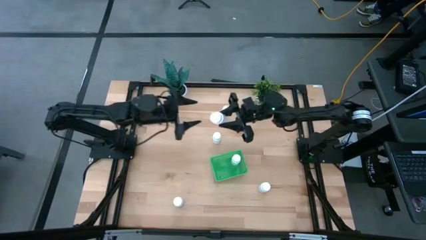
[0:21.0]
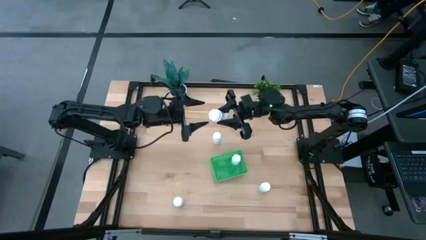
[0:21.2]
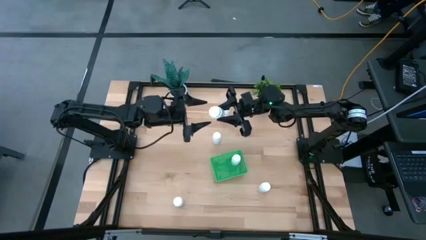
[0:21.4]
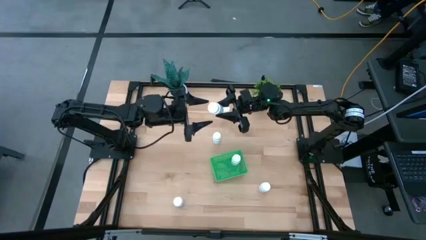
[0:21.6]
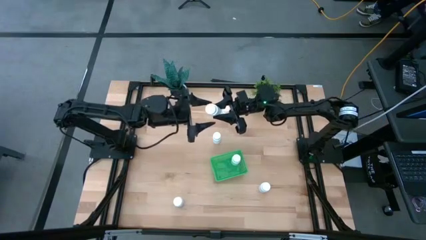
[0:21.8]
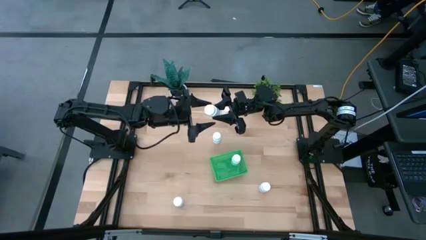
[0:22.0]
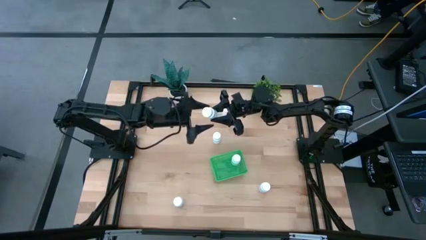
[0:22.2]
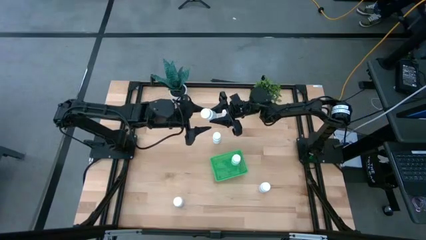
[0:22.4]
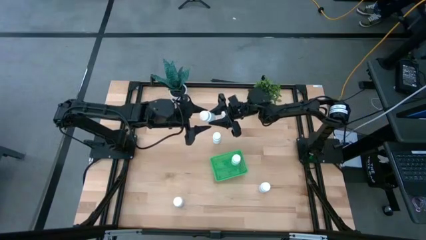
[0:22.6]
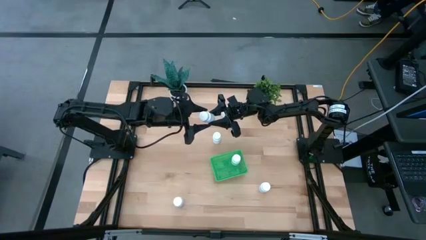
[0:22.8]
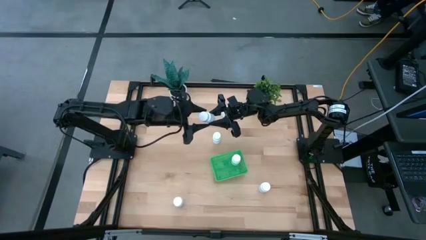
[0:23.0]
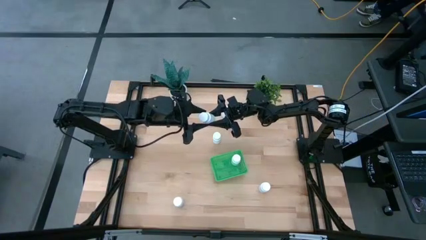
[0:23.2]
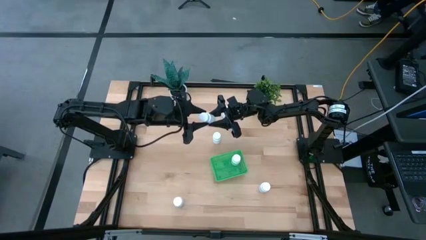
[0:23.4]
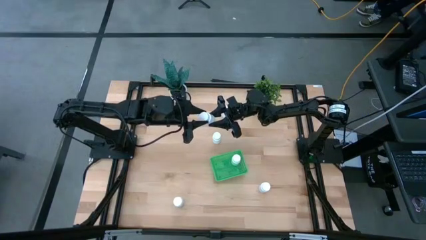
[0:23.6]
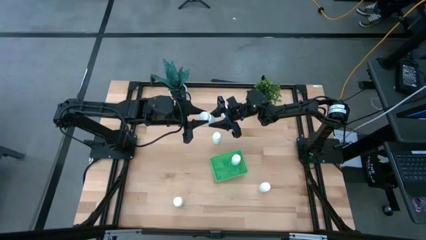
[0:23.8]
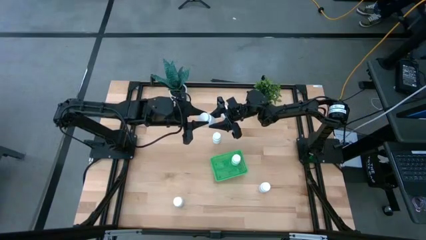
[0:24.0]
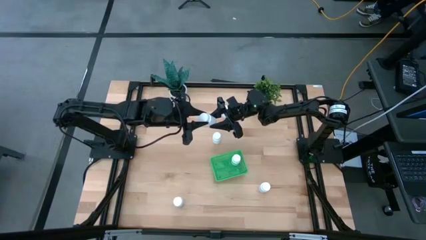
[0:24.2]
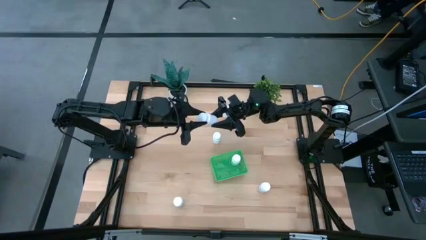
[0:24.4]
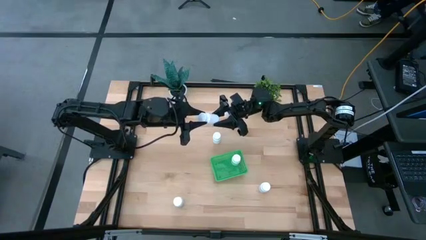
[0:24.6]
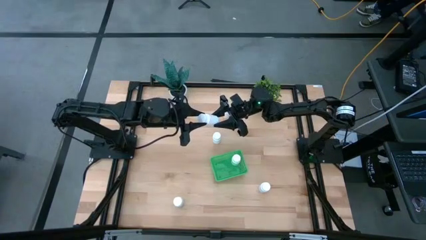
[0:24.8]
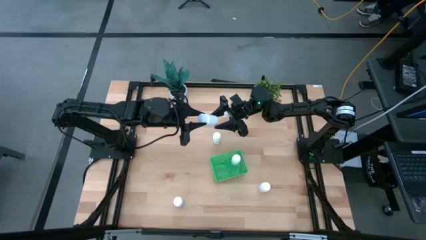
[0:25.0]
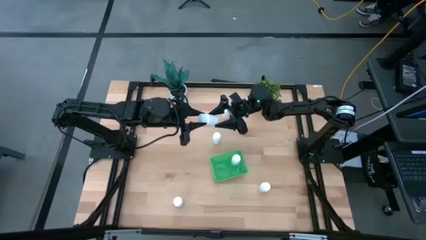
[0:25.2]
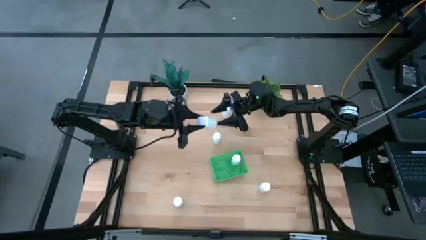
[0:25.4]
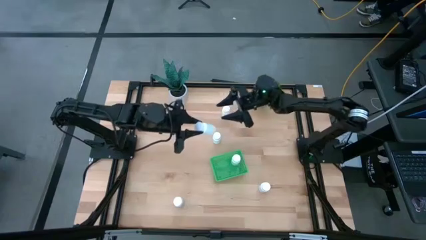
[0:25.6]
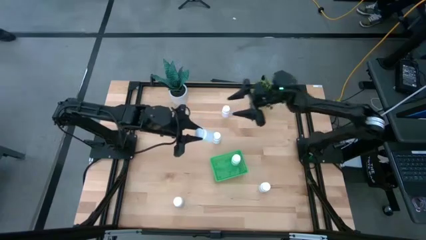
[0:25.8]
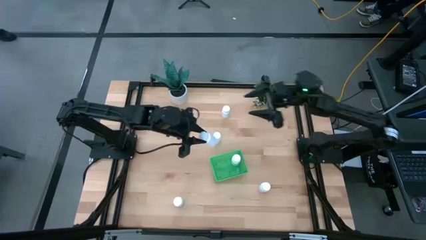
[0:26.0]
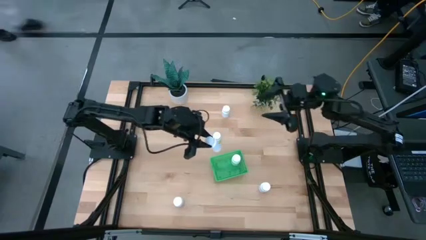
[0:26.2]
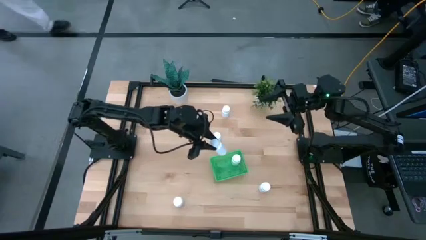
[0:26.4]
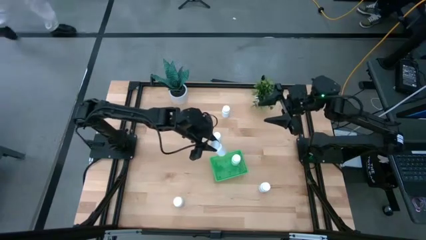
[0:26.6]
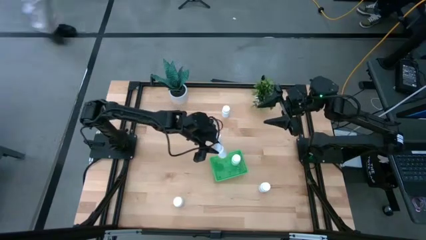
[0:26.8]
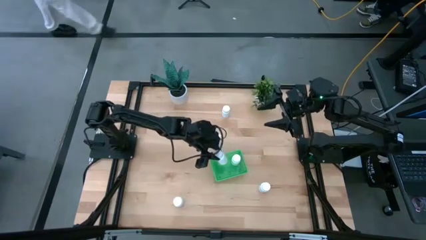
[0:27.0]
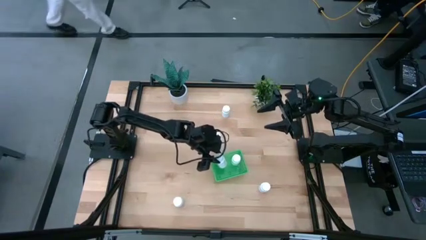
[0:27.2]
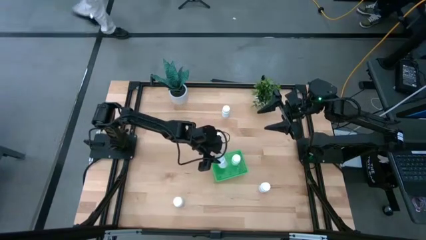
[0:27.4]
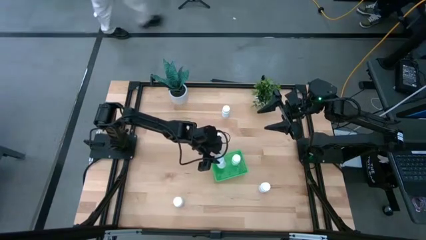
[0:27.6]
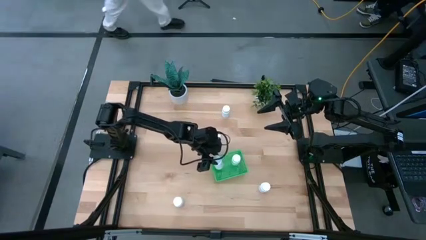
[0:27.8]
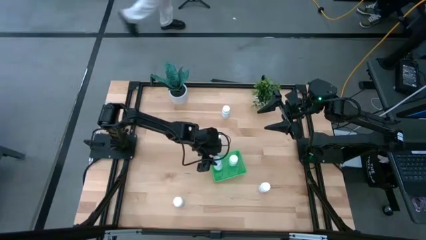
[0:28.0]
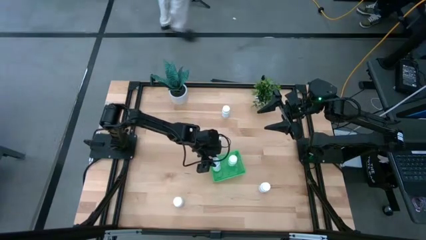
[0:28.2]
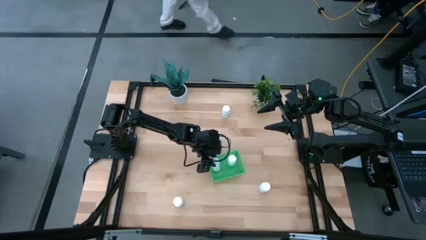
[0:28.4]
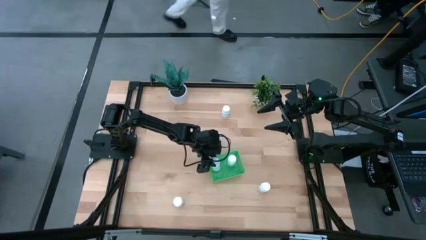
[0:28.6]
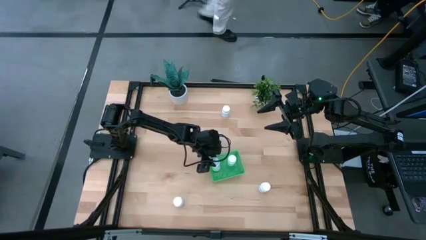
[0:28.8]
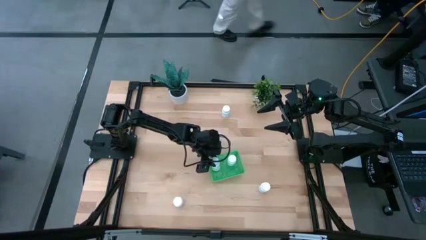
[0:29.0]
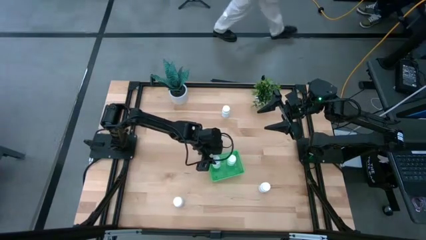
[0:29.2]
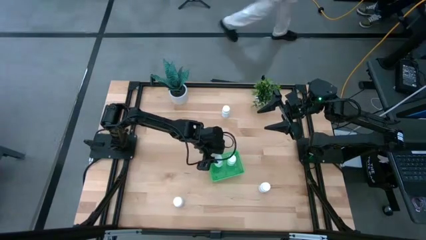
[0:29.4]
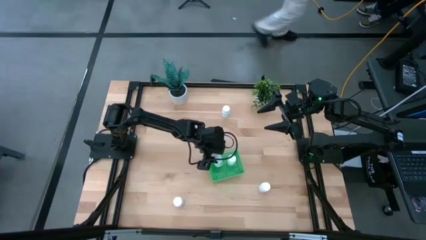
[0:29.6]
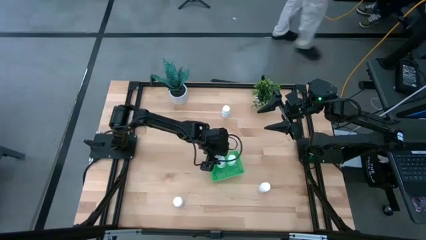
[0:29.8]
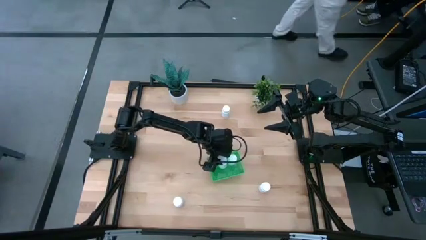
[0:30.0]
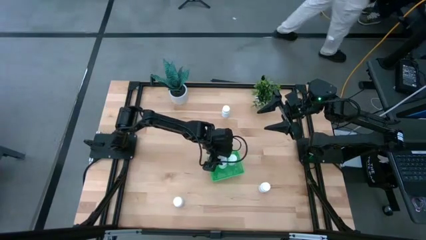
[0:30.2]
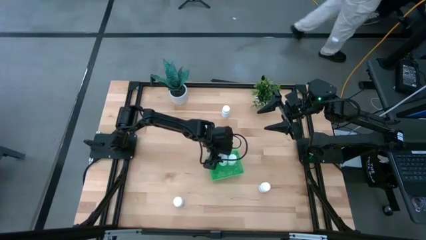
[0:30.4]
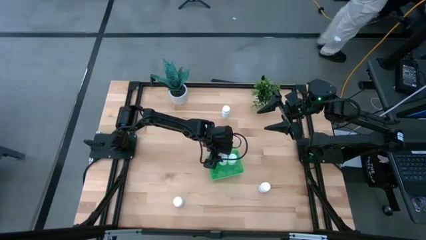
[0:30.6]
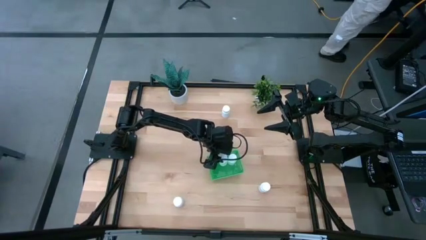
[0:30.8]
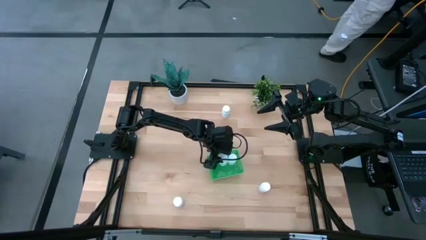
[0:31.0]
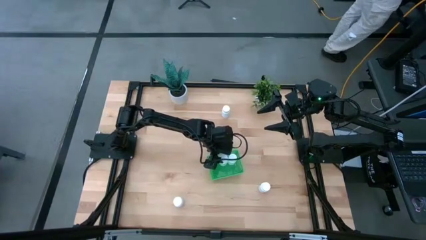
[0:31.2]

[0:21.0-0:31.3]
Task: Pick and place pill bottles into a basket
Put the white medicine bottle into the green basket

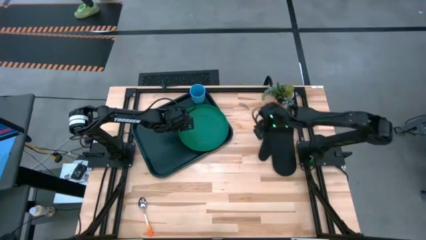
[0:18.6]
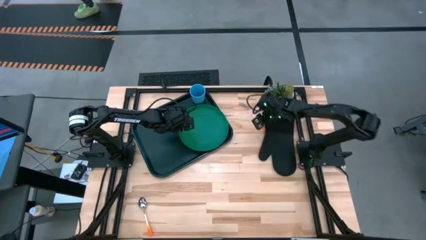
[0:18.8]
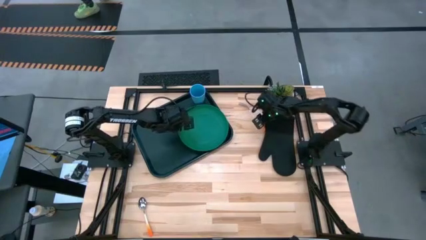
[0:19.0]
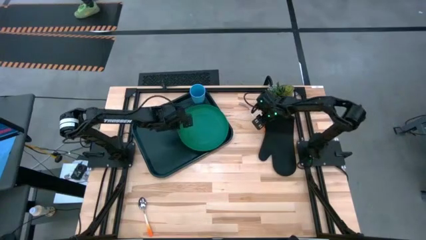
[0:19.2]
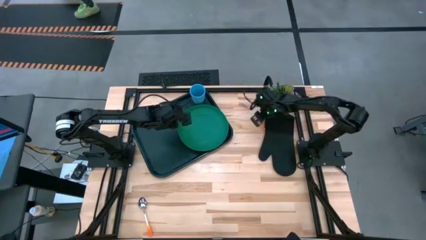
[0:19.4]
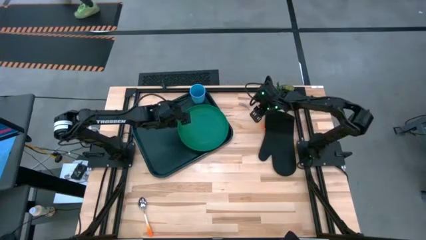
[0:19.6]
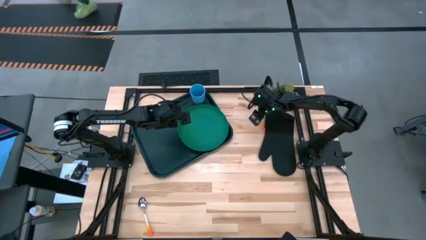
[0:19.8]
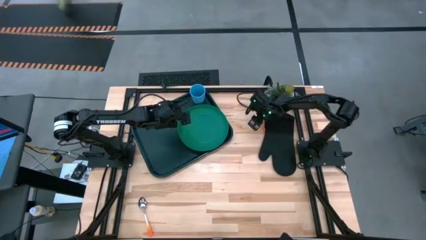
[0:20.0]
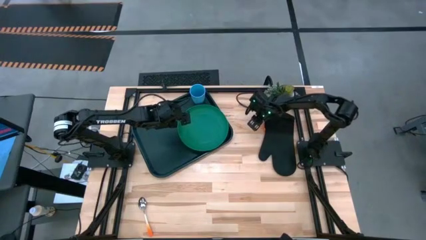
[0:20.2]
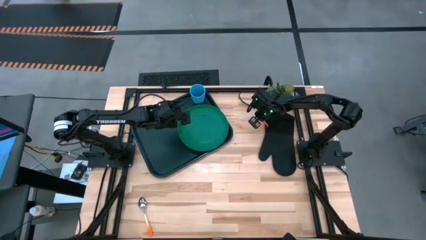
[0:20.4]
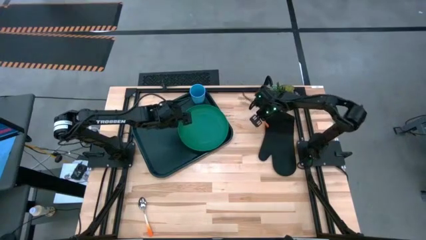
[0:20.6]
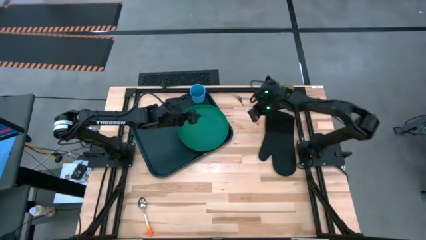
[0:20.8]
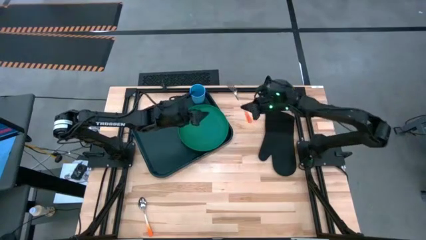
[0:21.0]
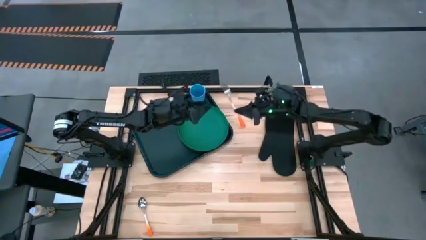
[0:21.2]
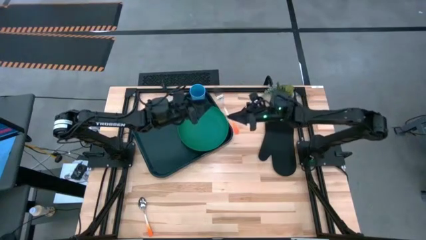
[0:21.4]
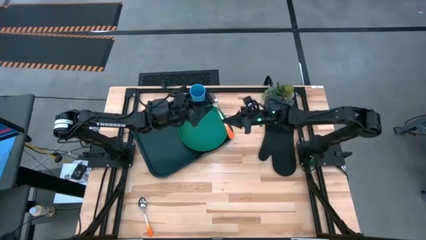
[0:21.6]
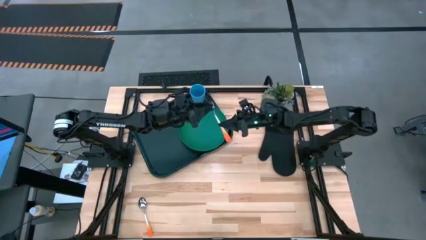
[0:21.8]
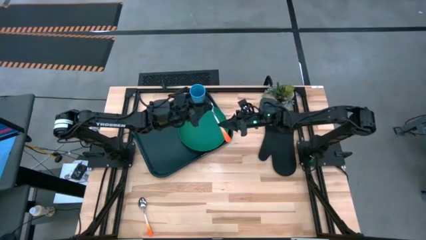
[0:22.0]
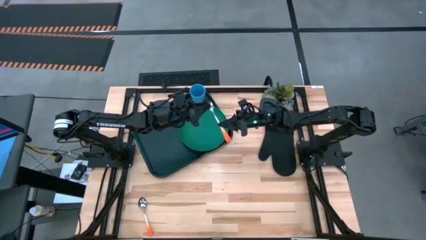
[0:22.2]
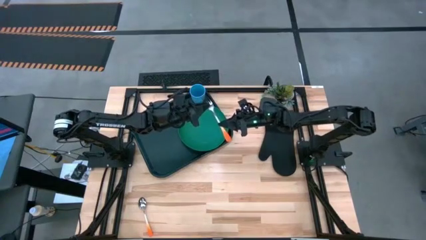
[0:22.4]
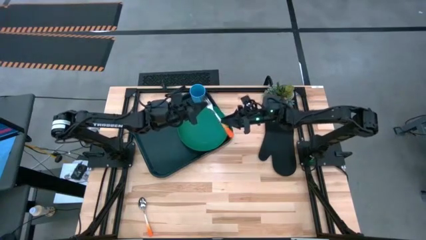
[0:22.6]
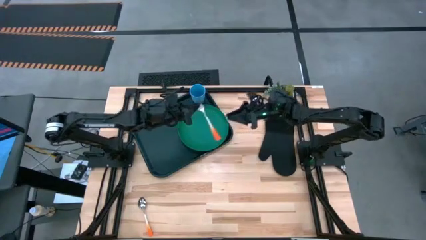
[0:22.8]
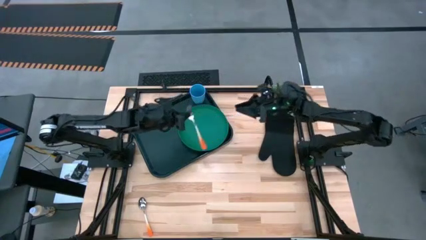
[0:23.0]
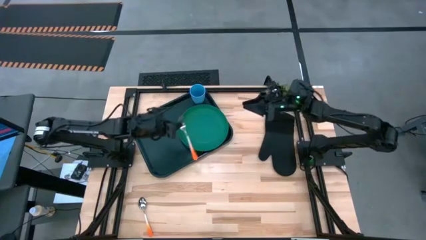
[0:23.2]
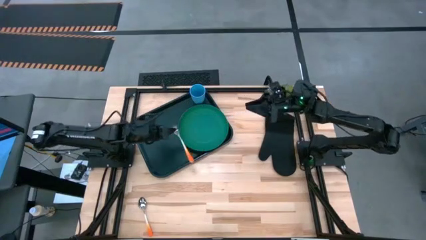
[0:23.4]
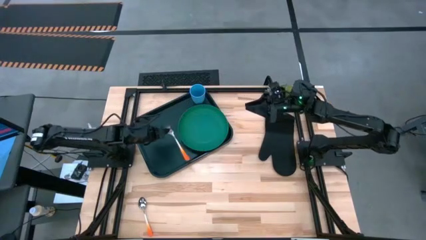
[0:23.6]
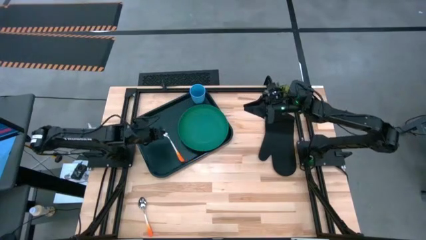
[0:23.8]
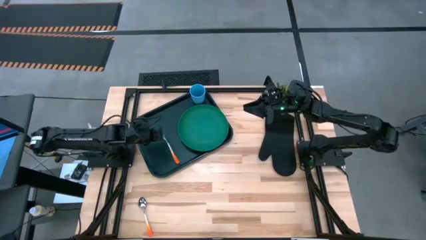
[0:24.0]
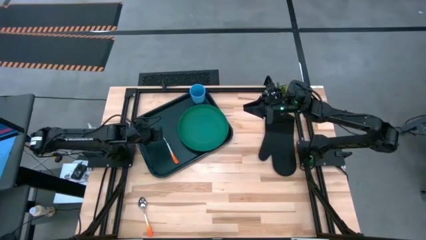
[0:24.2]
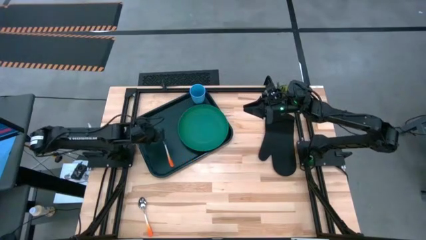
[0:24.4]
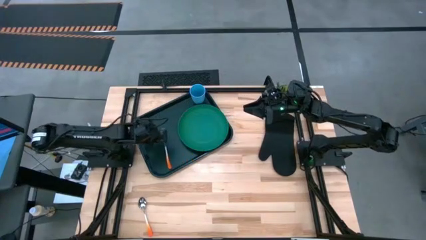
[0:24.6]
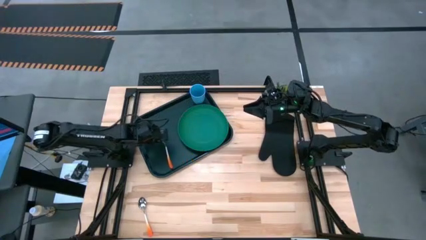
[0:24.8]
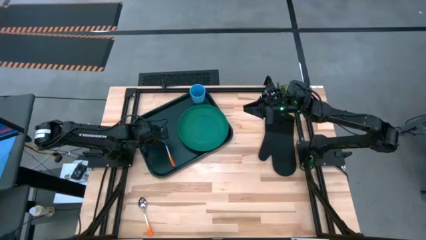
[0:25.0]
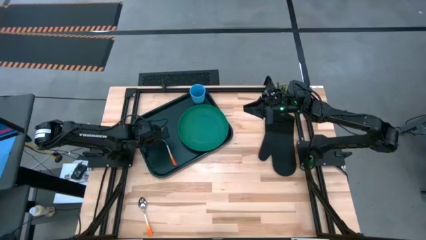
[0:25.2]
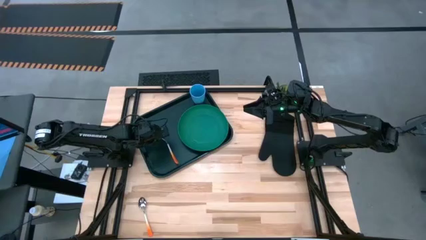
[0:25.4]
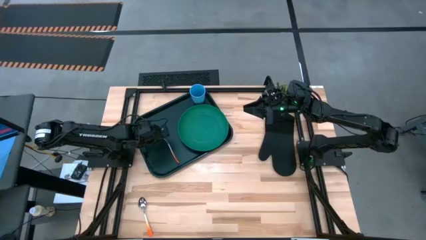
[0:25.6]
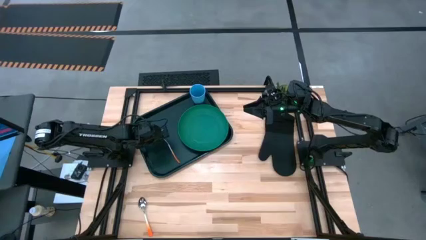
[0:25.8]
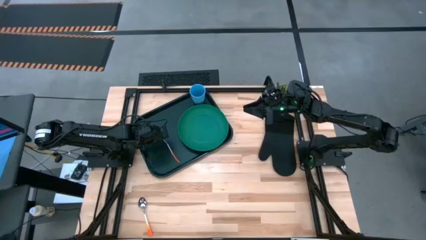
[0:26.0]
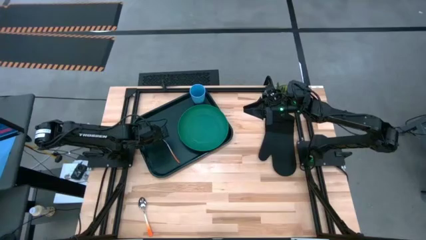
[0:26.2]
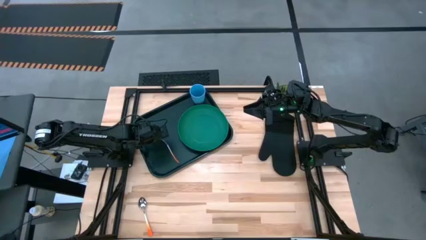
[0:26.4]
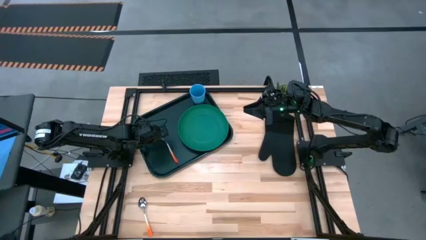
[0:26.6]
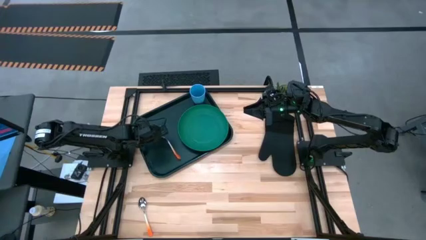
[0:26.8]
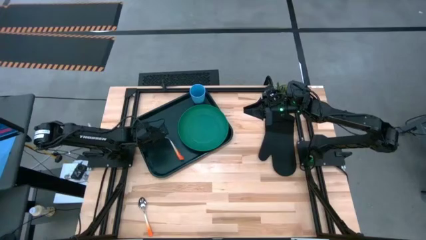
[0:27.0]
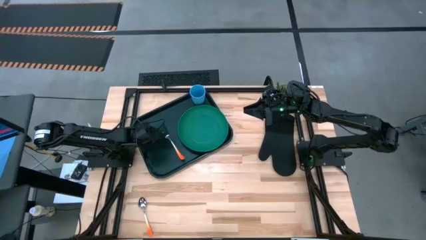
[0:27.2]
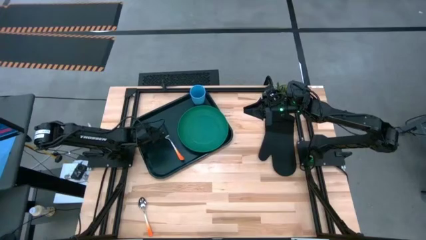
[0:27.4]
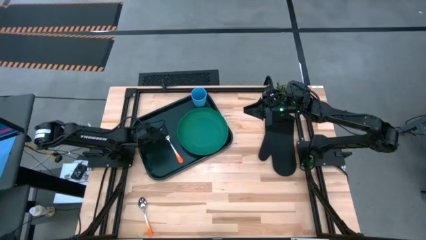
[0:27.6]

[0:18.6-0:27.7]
Task: Pick and place plate/cup/fork/spoon on tray
Put the orange fork on the black serving tray to the left of the green plate
